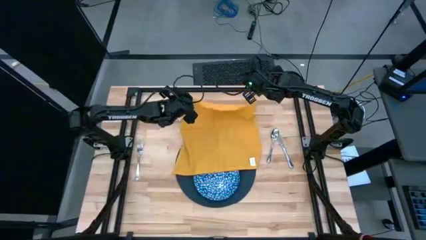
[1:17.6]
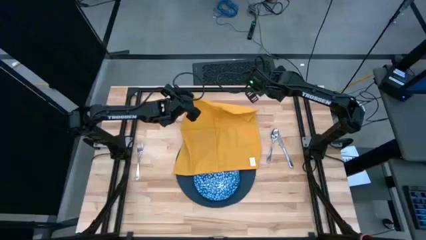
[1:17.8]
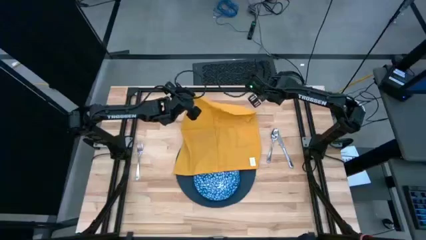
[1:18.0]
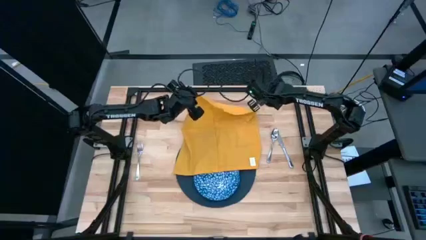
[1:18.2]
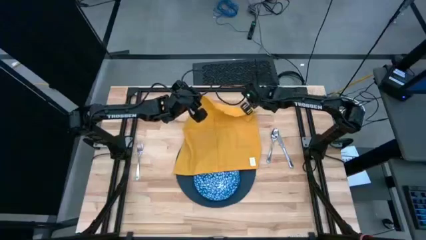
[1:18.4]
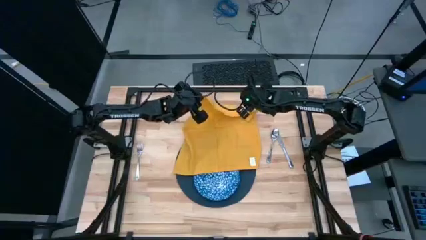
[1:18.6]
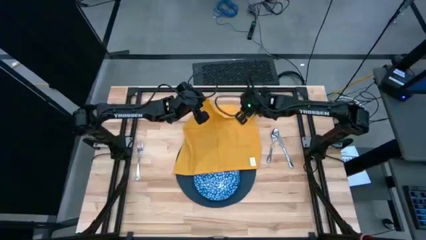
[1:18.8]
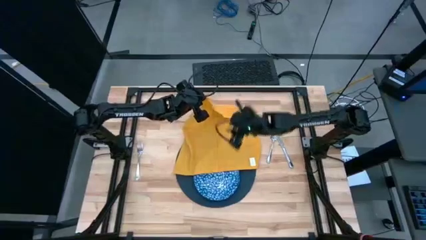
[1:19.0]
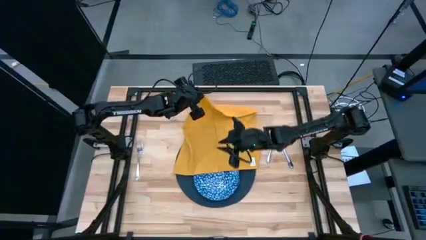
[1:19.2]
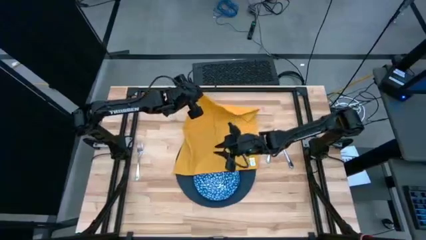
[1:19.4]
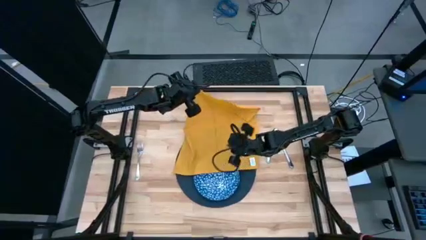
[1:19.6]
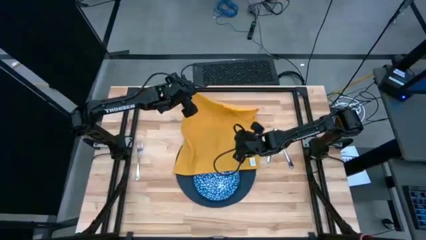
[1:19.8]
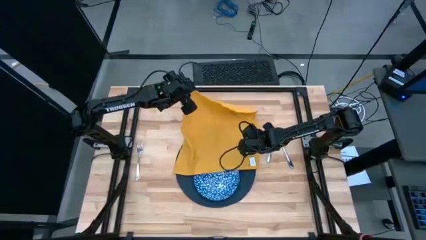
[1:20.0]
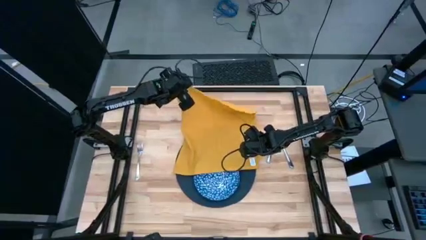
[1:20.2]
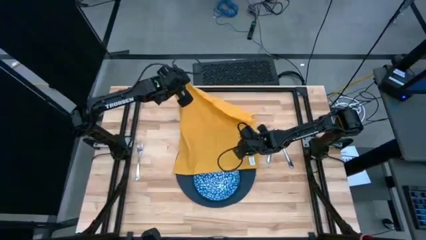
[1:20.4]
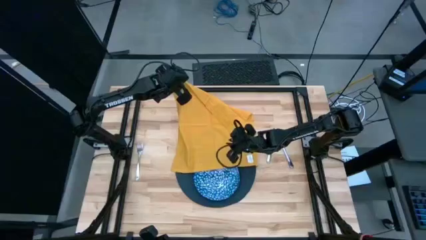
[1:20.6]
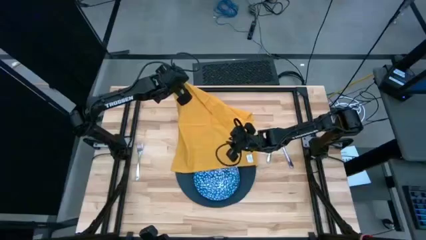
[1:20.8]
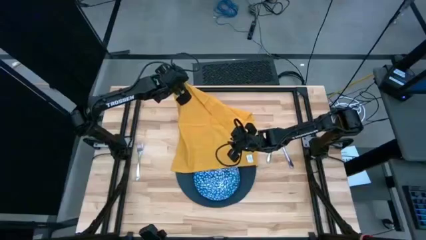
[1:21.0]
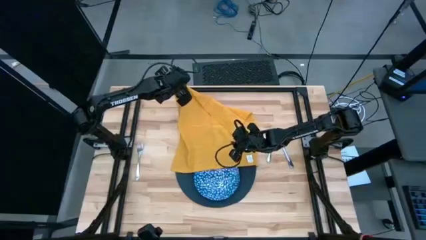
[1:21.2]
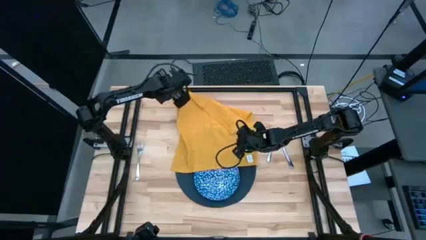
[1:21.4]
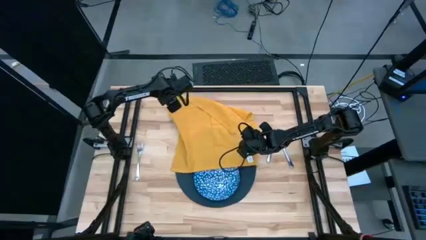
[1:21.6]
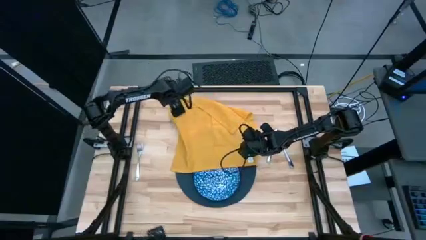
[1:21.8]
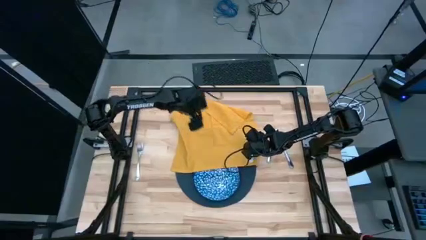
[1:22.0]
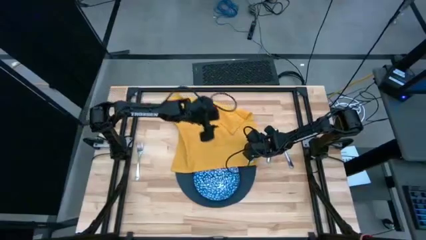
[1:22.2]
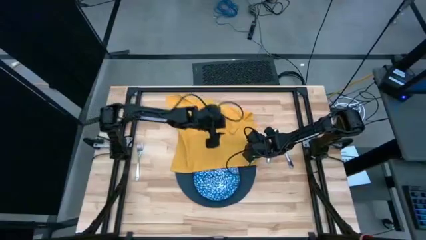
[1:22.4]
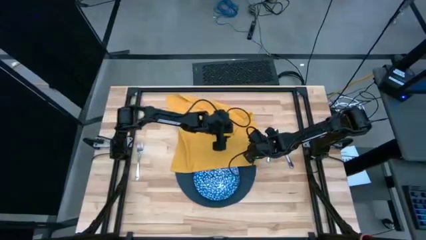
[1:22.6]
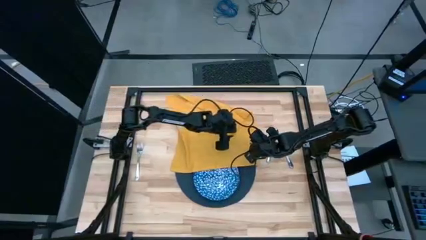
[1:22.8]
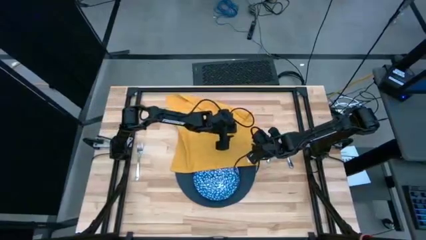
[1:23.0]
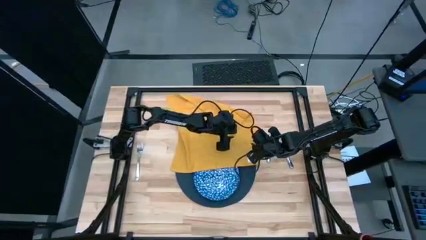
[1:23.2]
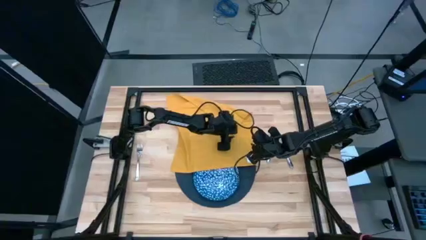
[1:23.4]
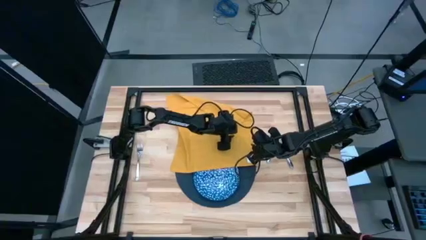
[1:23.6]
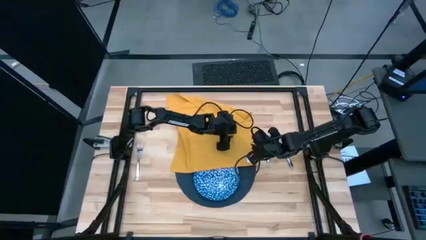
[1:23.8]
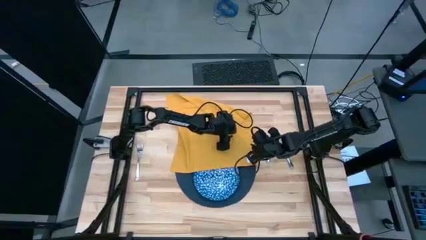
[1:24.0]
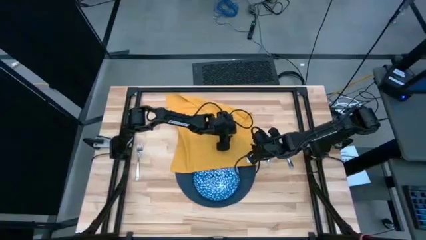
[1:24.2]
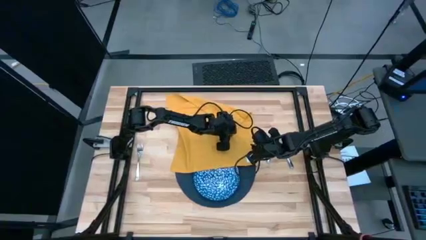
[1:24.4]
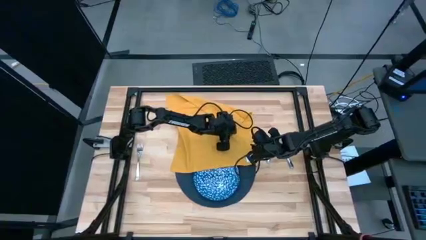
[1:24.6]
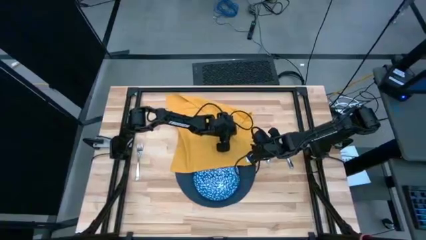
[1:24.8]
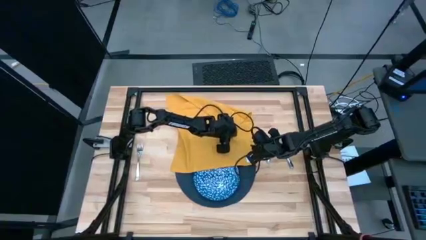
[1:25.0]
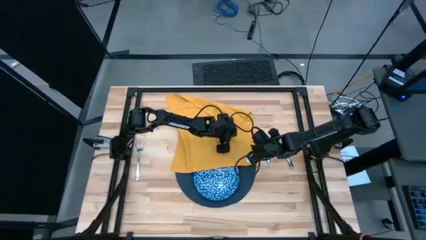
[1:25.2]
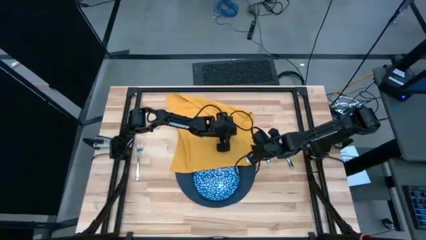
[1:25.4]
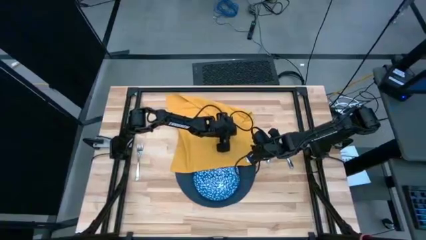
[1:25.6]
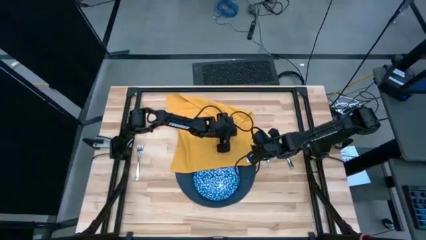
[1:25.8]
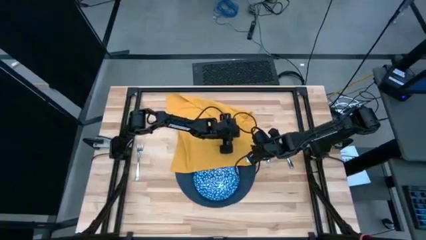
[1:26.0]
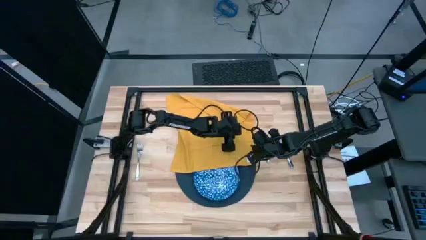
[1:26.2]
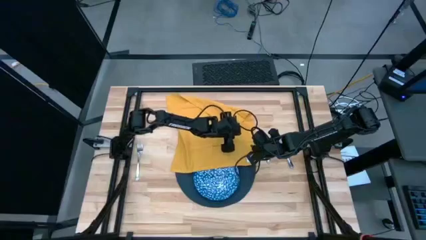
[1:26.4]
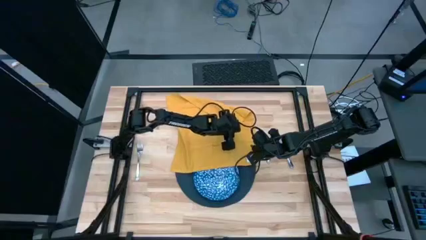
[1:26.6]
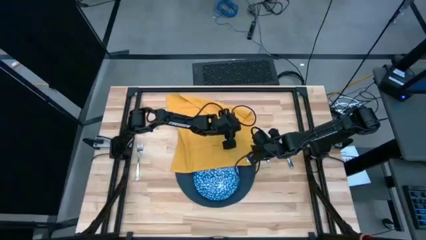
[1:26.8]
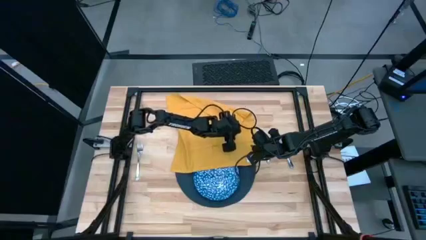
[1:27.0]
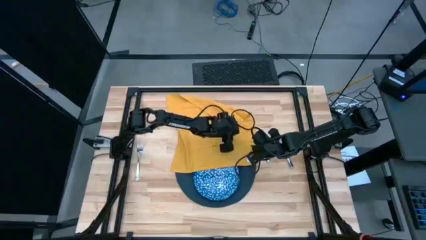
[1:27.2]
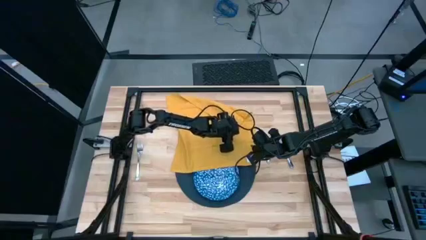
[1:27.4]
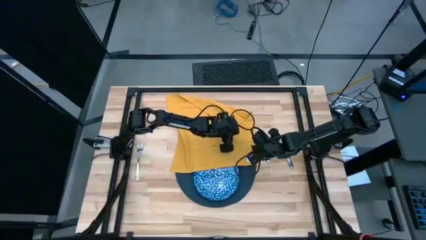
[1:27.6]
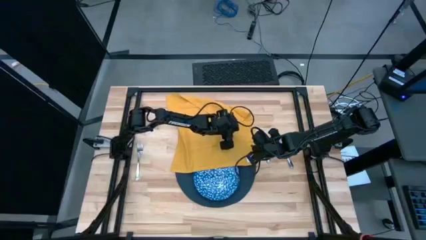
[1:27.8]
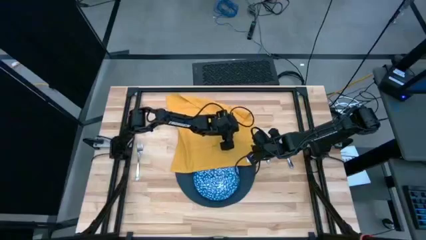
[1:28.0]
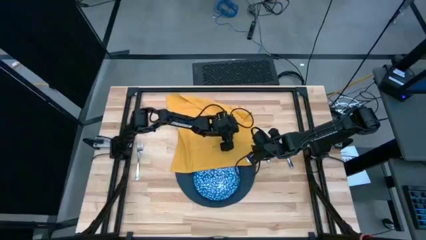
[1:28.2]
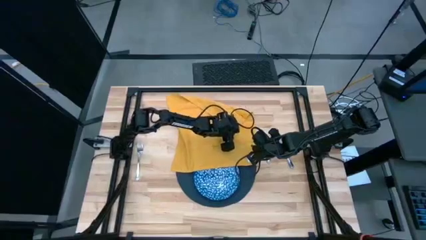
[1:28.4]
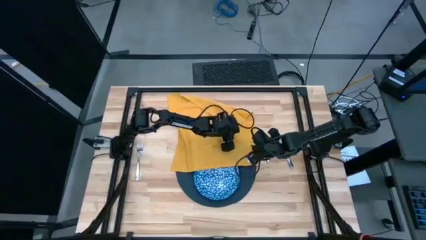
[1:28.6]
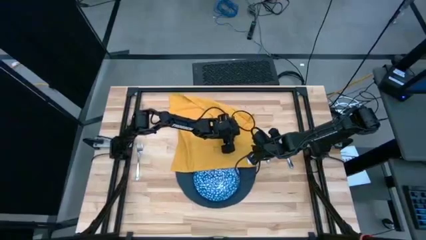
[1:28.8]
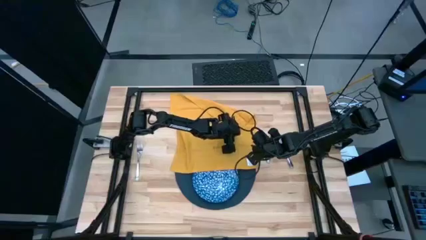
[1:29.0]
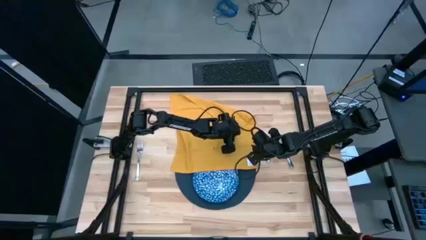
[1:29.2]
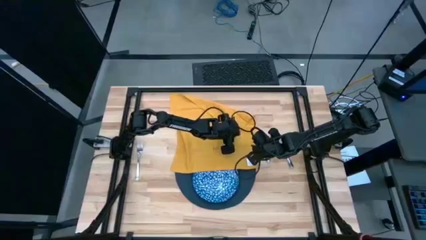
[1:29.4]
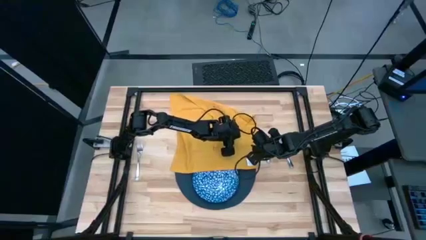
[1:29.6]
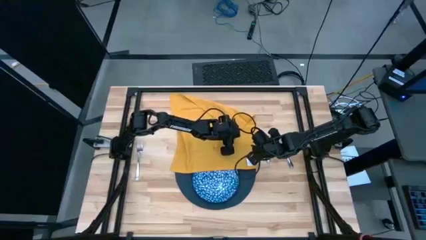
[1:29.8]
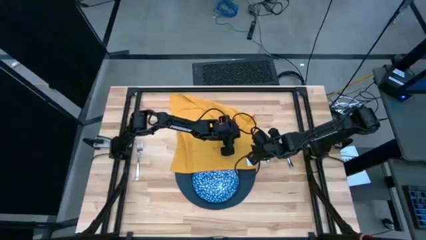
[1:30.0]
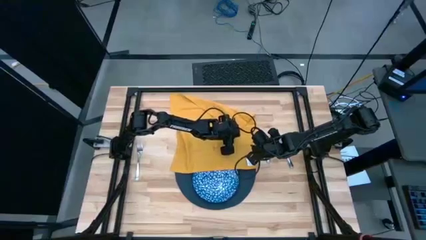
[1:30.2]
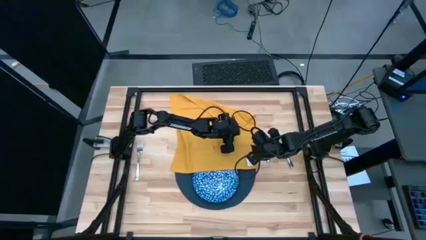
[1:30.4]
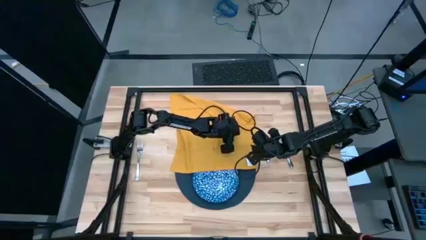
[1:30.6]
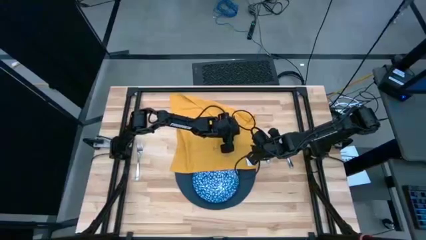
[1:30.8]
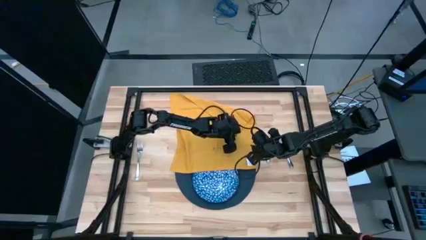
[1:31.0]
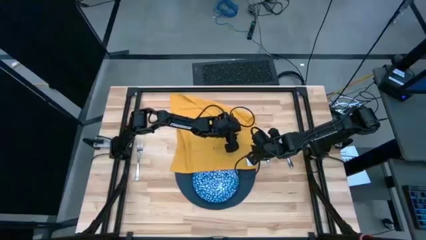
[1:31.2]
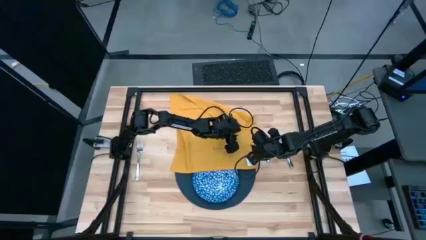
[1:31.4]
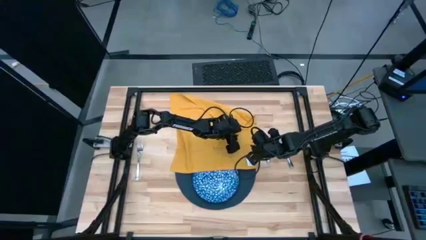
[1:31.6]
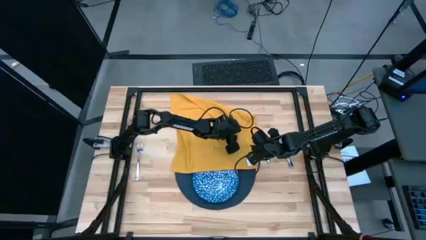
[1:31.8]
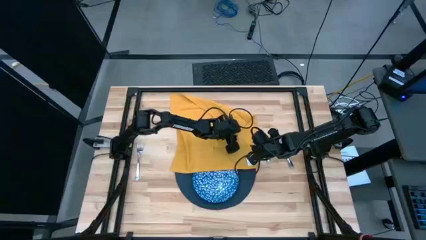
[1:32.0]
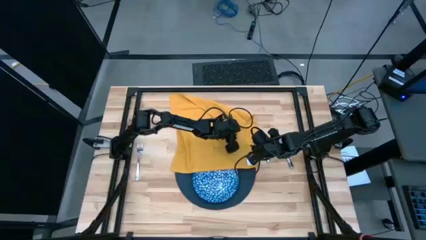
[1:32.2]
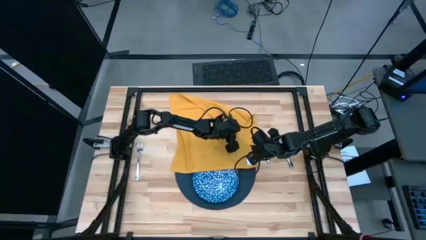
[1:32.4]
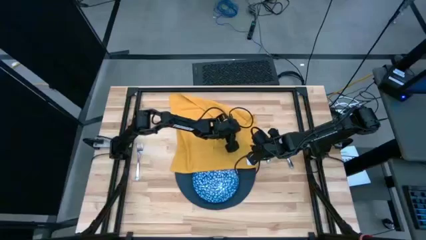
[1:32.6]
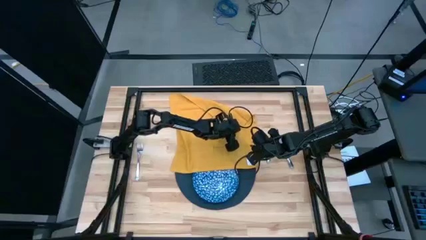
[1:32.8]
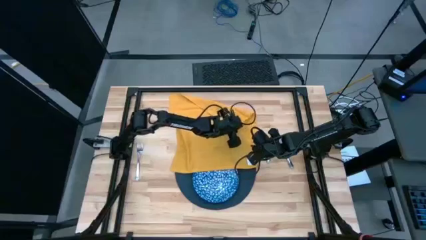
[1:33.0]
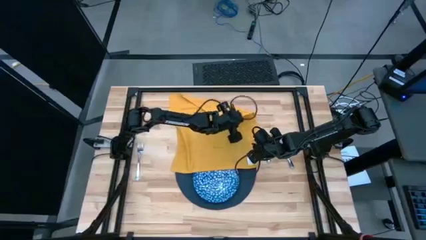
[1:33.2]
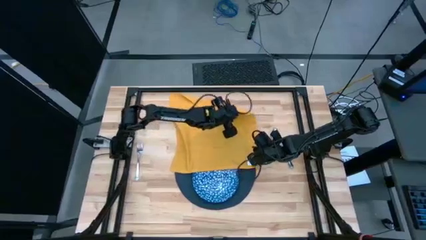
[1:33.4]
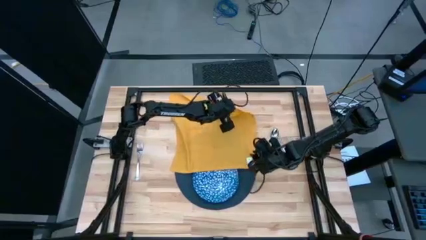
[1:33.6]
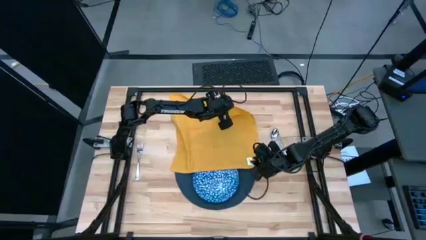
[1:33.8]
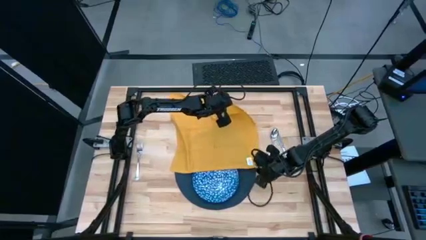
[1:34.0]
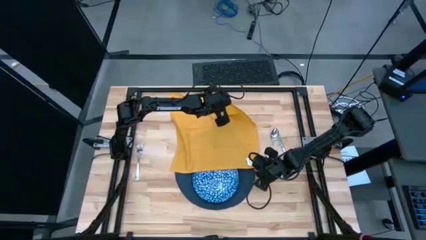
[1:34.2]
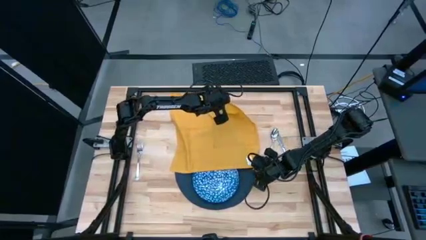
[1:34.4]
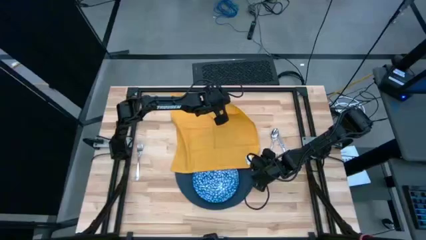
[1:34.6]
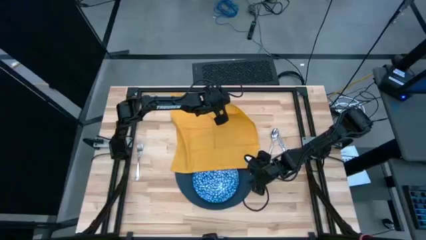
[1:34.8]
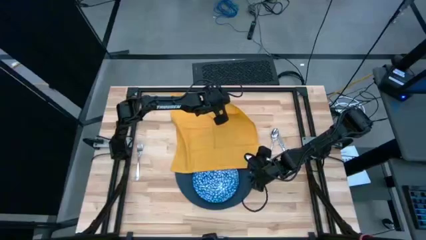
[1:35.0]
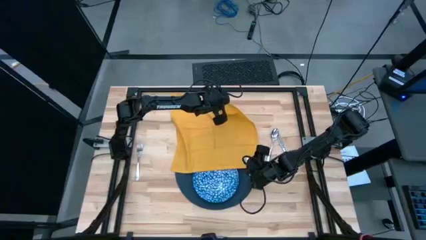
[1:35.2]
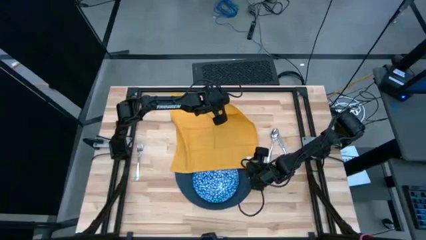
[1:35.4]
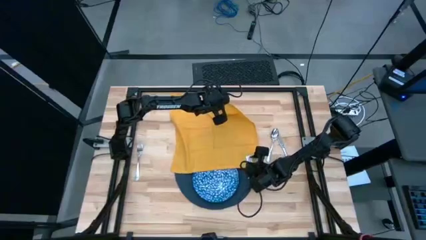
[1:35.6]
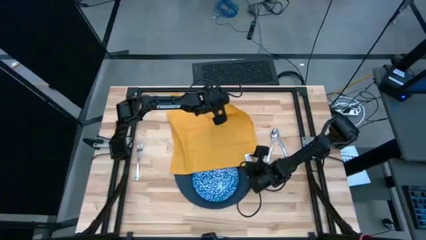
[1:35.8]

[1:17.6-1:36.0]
Task: Set table place
Fold the yellow table napkin
